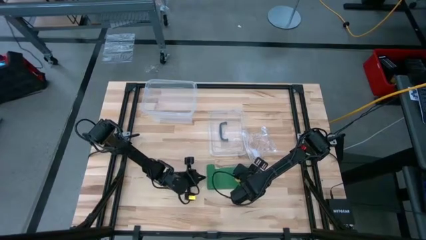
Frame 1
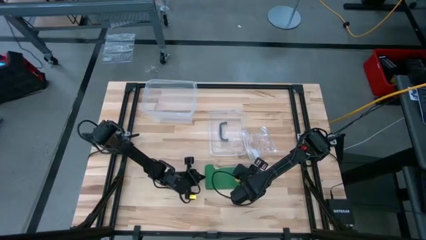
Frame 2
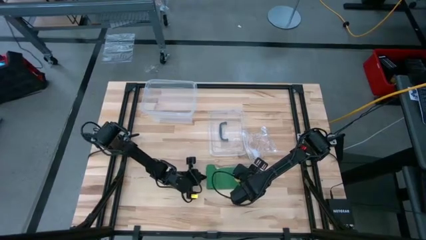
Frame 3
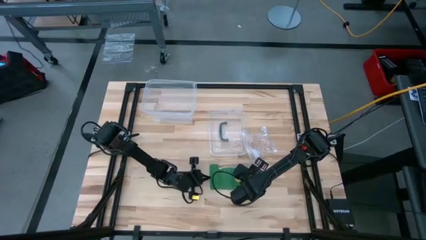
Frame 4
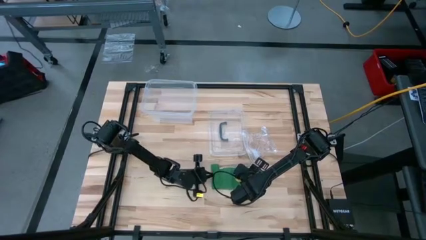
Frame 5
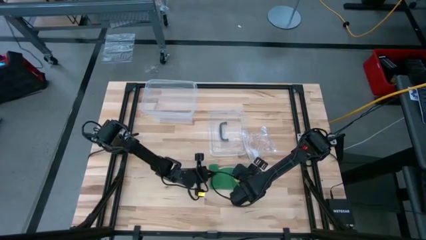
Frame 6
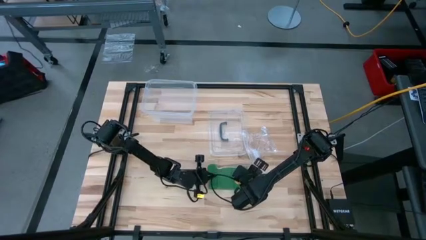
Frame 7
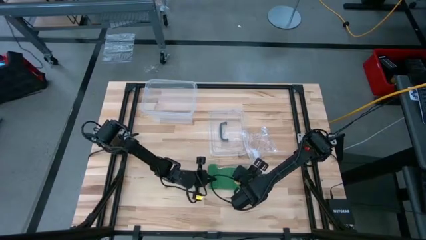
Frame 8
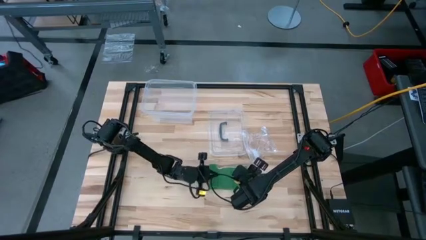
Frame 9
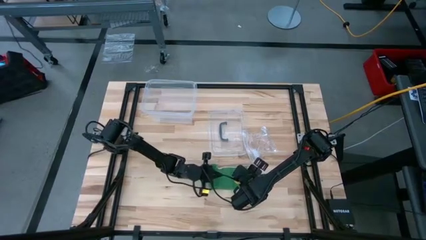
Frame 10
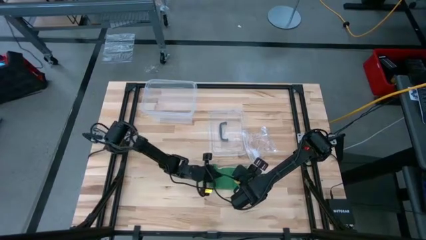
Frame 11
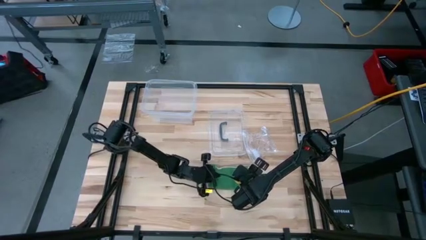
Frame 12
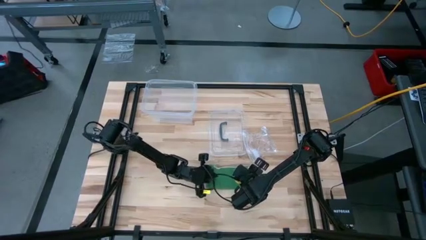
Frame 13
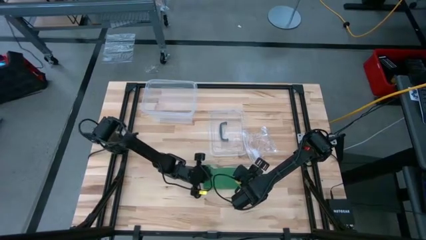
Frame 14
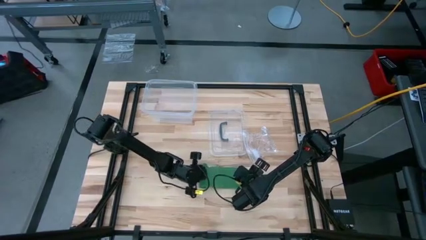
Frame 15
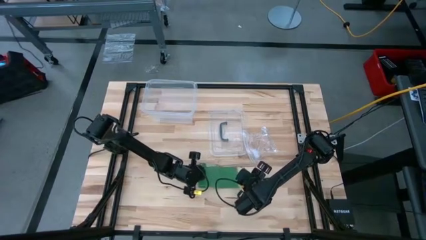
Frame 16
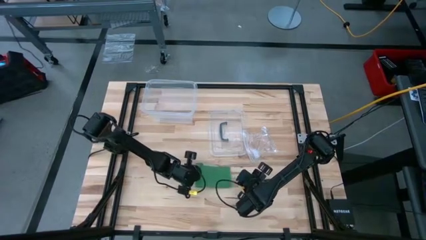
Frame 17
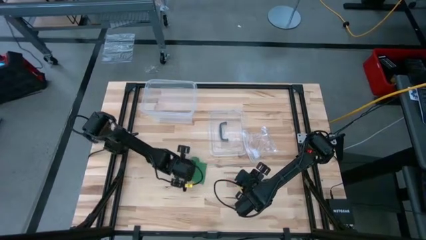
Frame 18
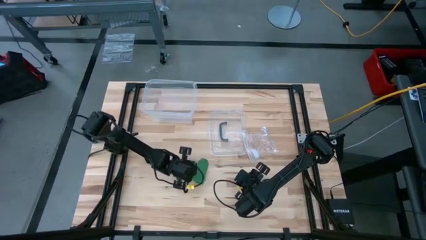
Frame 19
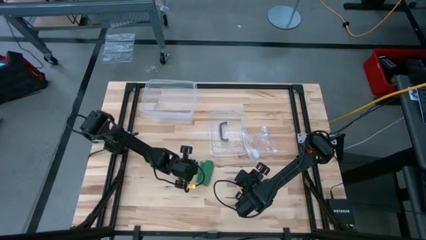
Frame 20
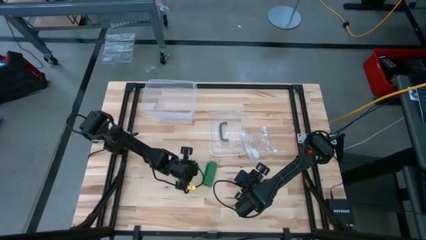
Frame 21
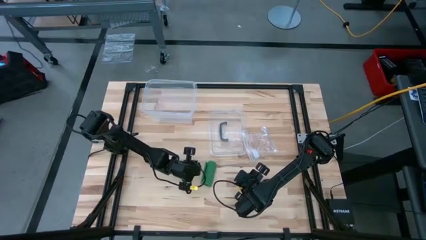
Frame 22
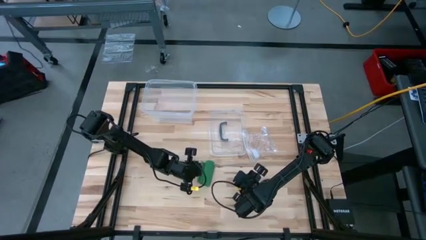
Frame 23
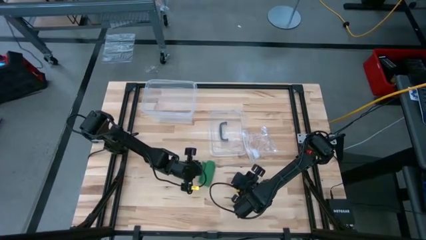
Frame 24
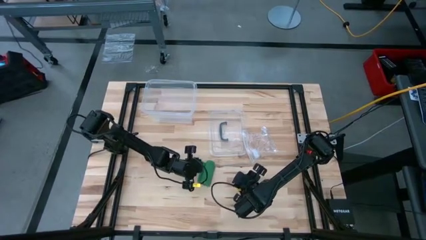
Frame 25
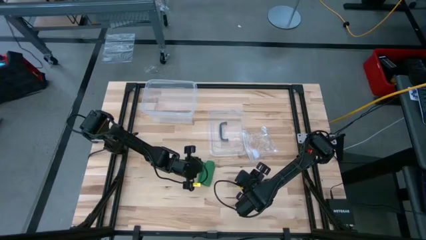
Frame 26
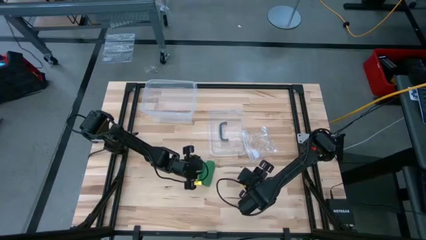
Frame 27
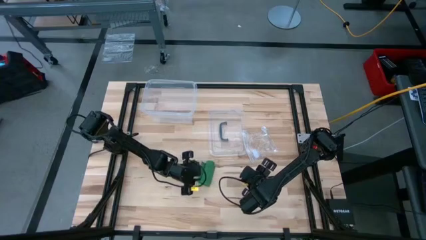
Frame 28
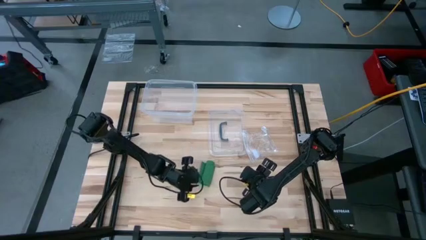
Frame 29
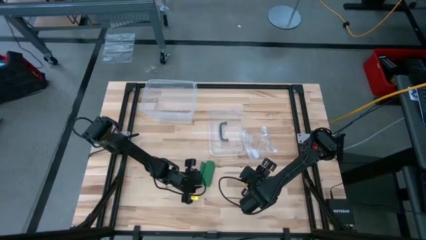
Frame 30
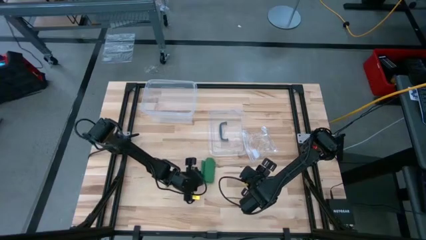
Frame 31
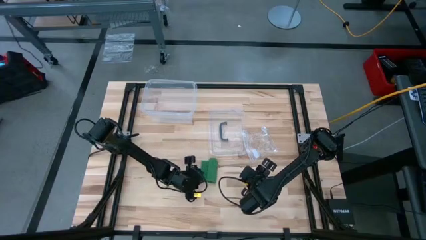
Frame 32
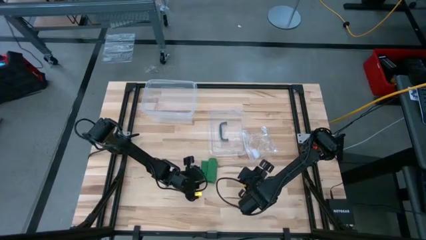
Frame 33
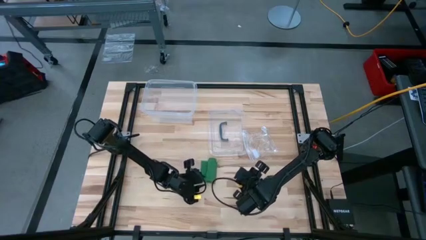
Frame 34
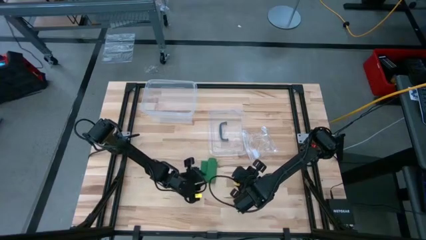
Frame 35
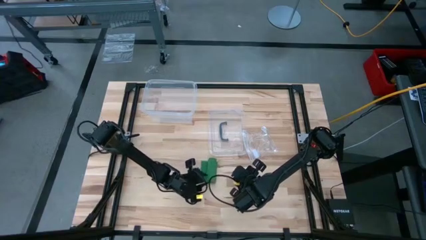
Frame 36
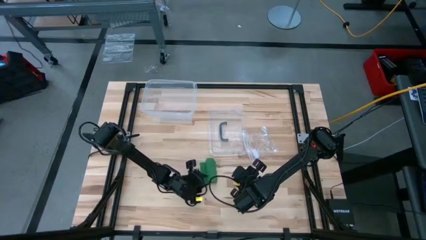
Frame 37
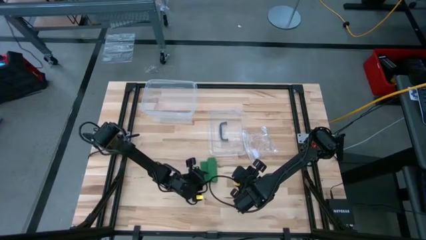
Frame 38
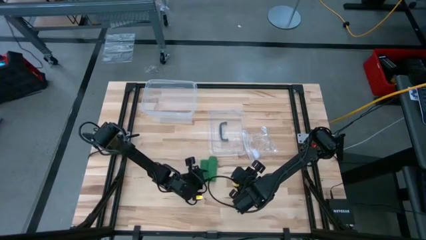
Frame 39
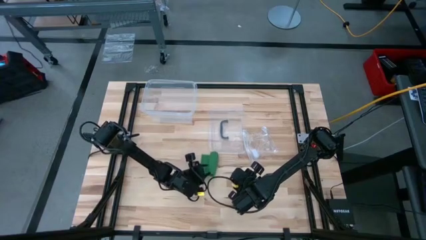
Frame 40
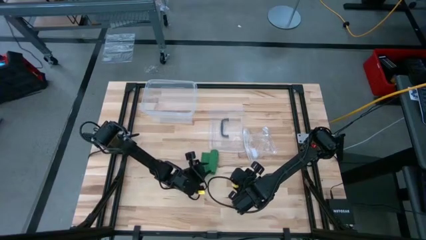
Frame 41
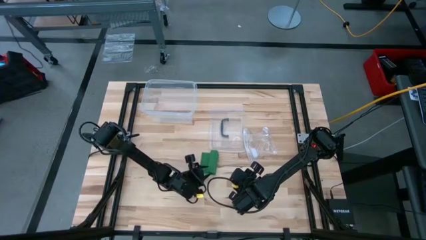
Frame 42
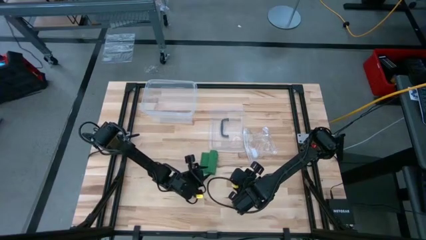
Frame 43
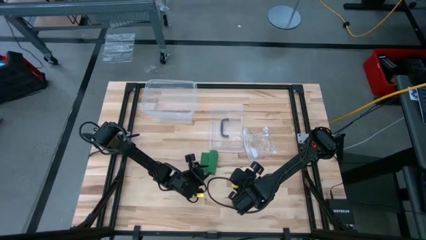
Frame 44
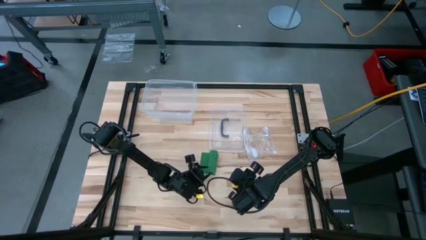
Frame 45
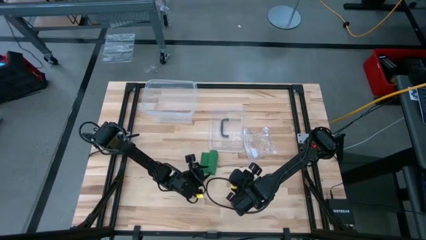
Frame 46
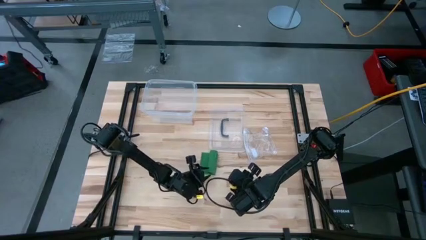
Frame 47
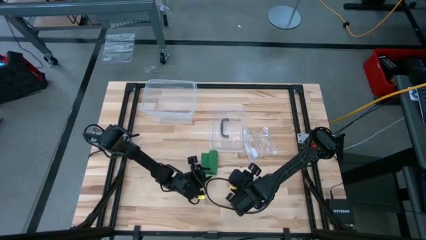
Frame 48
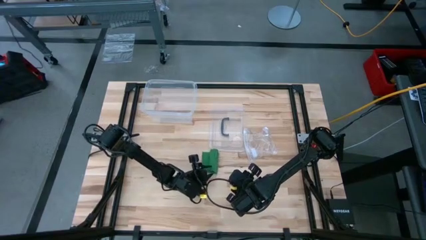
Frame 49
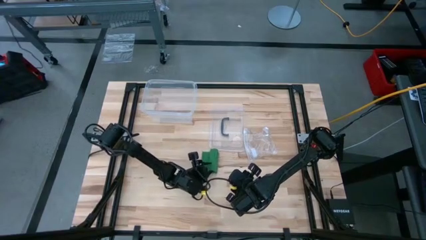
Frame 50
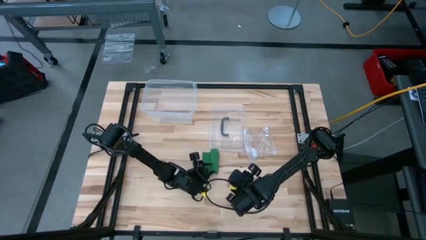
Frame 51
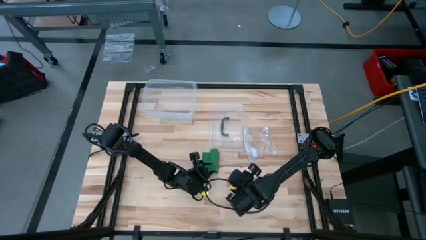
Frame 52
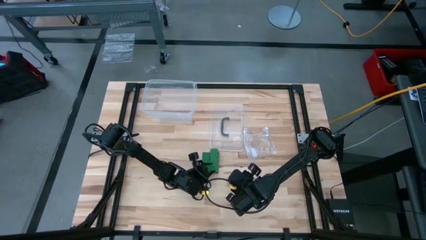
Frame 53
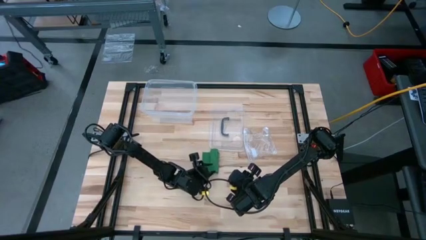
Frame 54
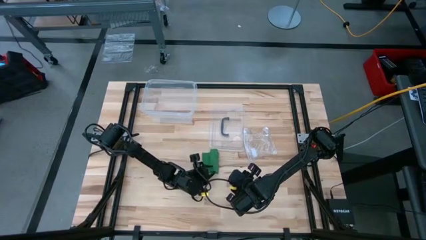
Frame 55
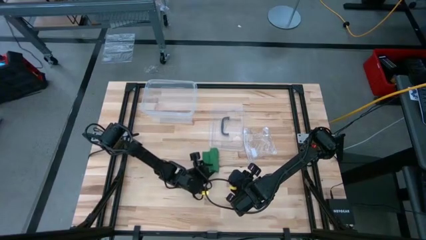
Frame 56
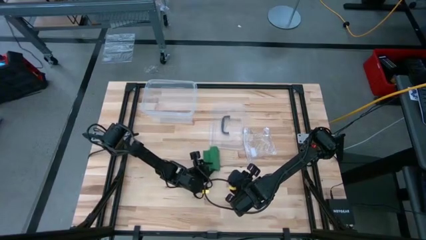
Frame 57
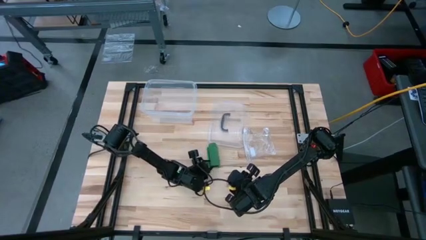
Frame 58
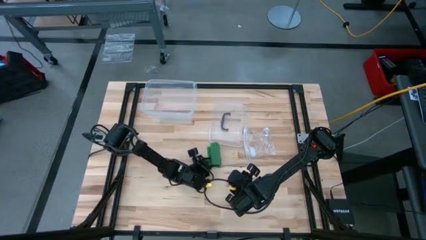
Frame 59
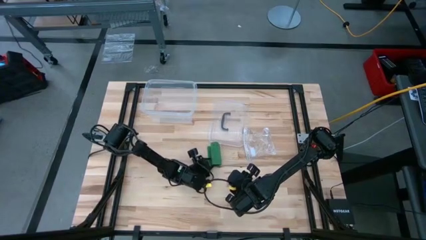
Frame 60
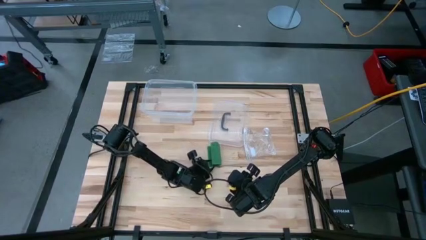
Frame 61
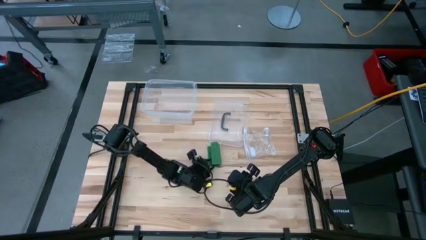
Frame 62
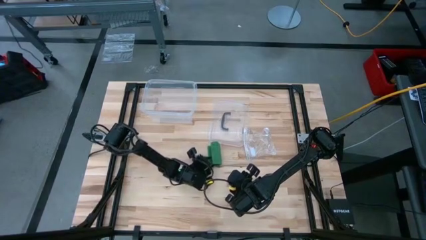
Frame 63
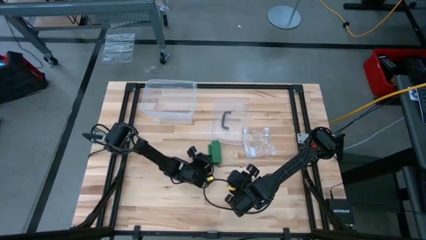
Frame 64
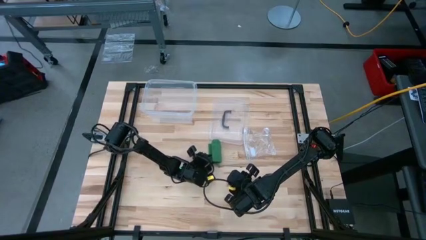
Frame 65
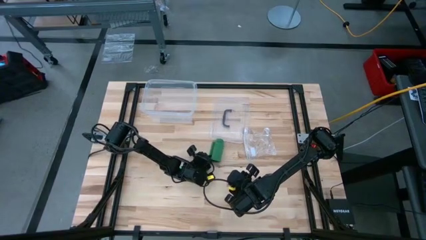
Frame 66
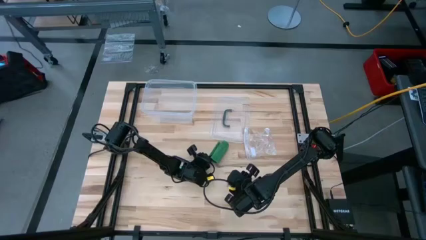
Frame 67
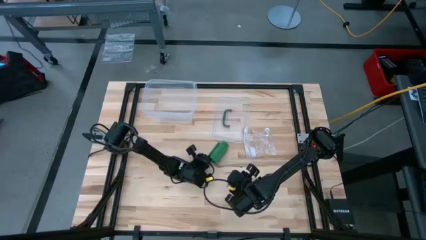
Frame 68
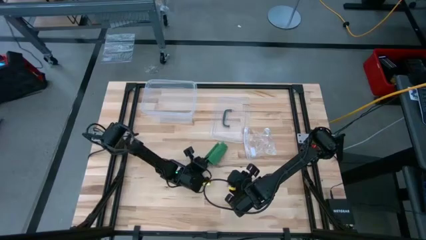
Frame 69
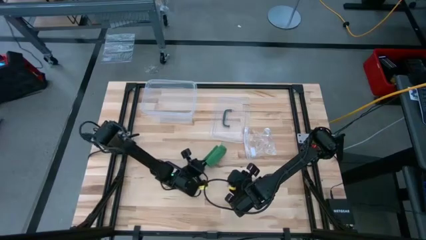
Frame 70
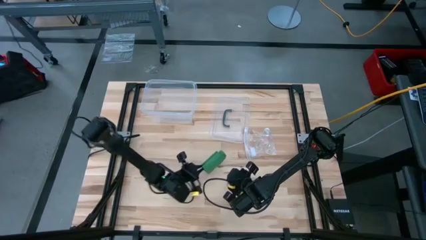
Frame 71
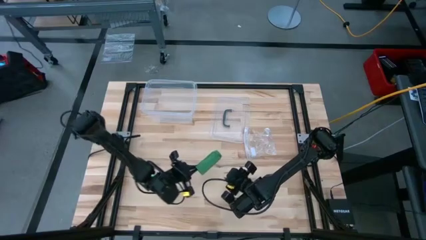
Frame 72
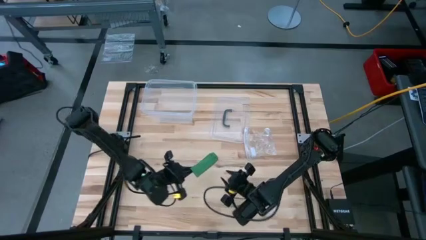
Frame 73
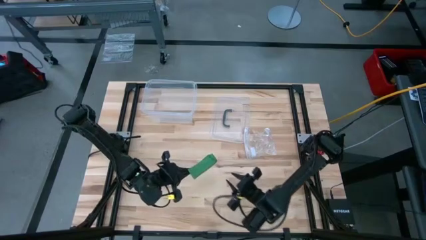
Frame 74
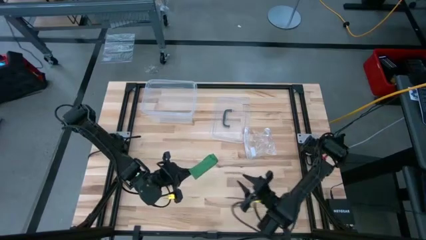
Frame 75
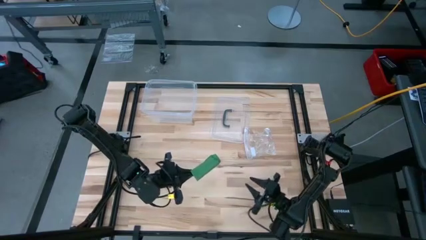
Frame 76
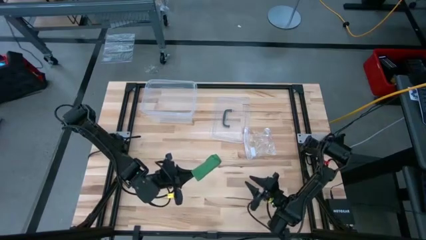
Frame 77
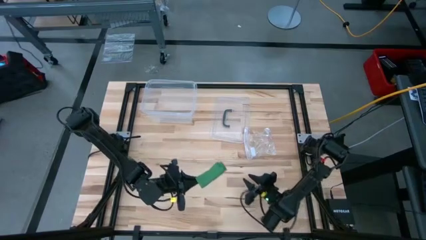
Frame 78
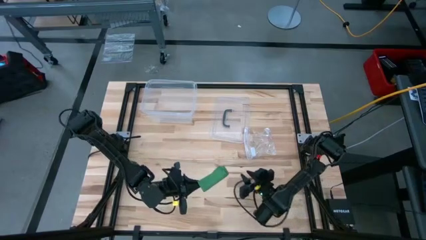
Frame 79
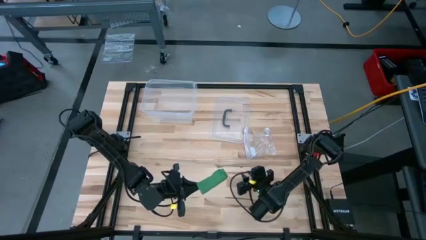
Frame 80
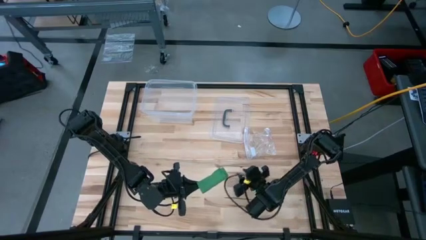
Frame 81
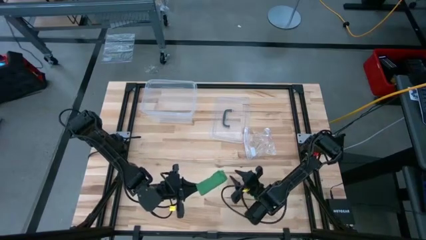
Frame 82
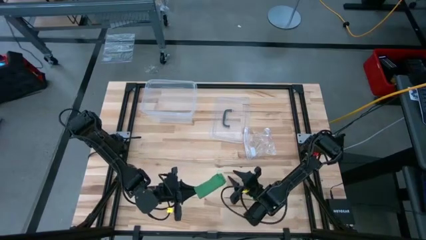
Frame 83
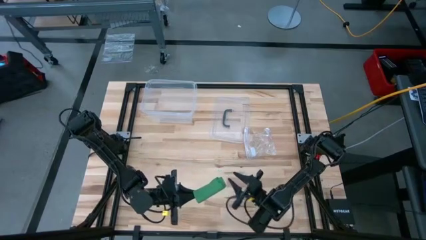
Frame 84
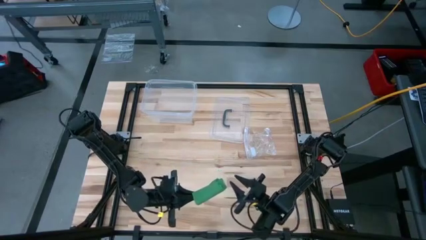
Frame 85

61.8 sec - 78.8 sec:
Task: Roll bandage
Roll the green bandage
